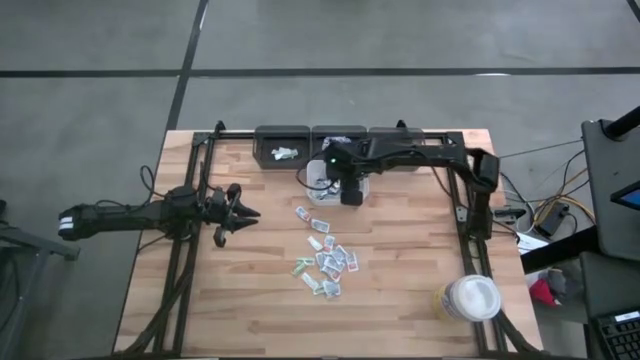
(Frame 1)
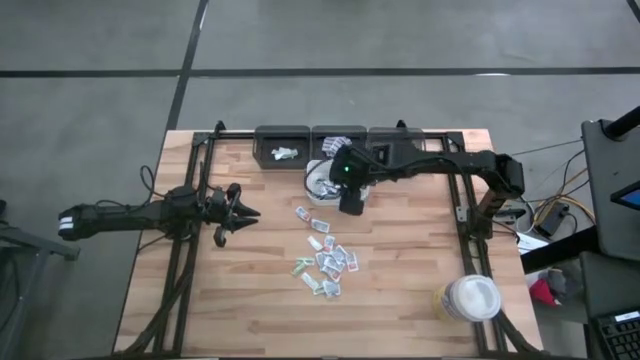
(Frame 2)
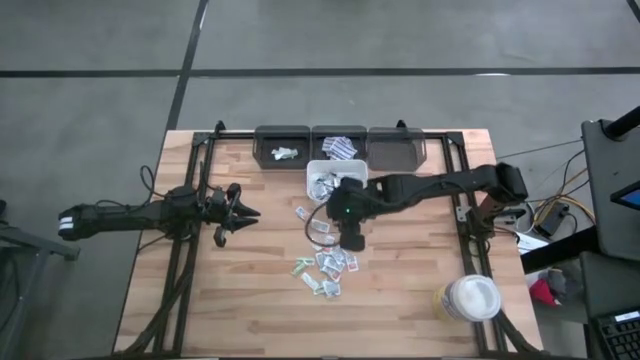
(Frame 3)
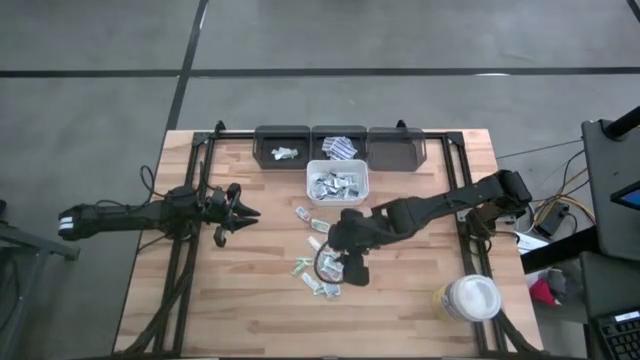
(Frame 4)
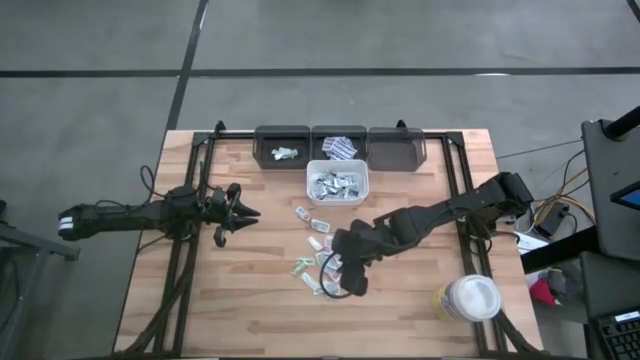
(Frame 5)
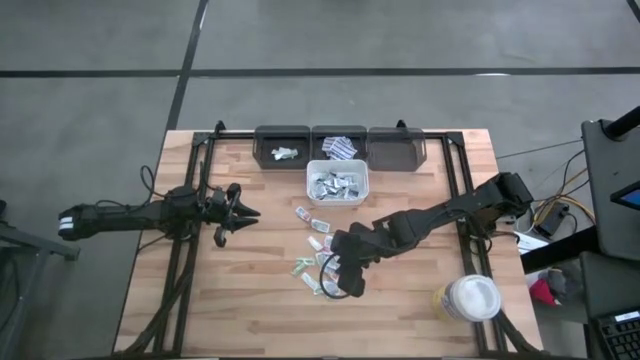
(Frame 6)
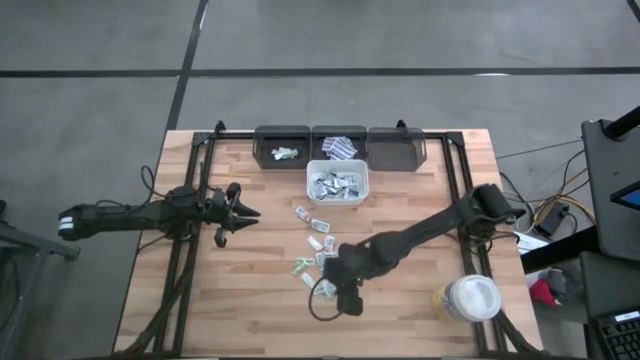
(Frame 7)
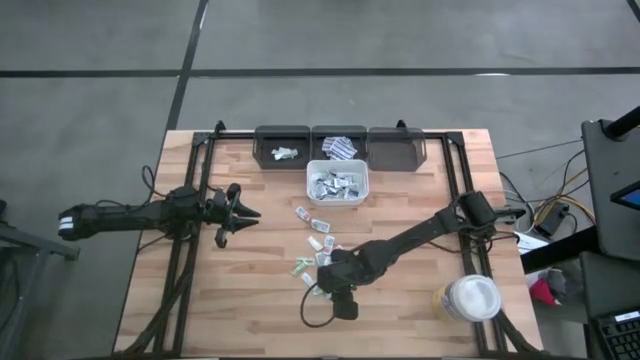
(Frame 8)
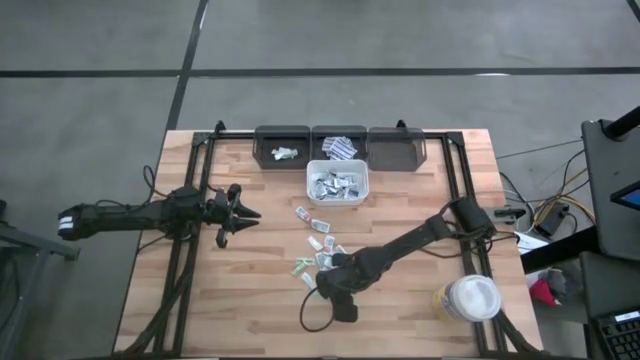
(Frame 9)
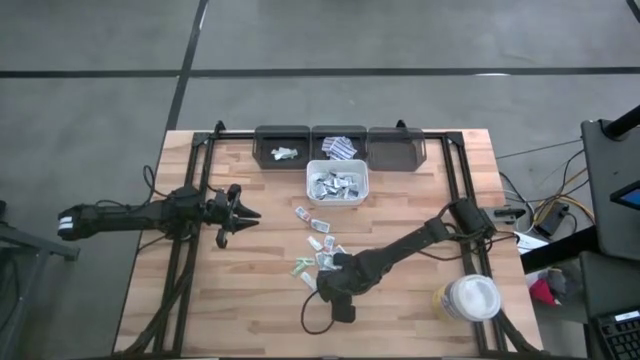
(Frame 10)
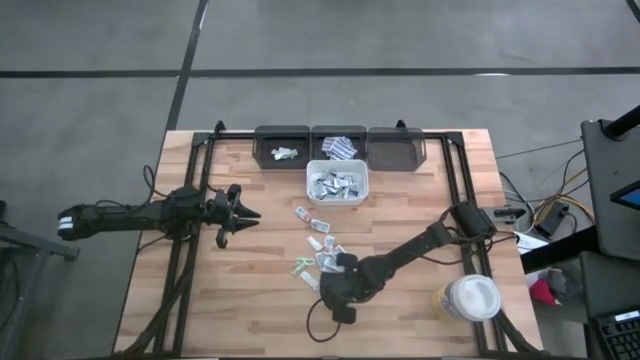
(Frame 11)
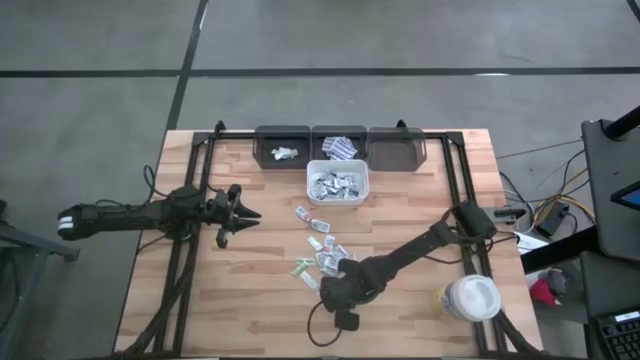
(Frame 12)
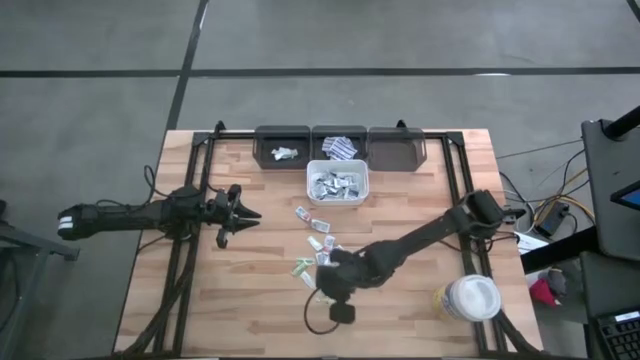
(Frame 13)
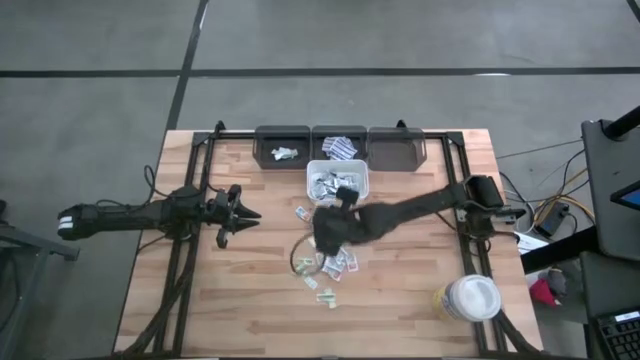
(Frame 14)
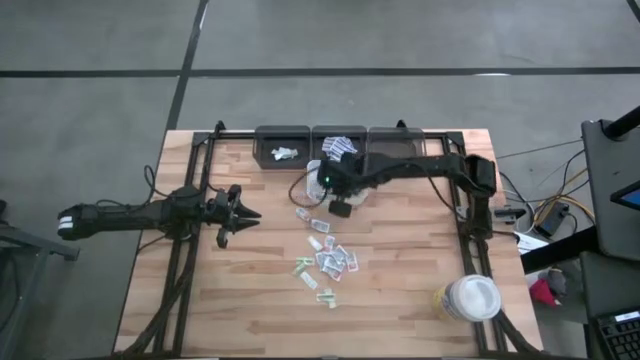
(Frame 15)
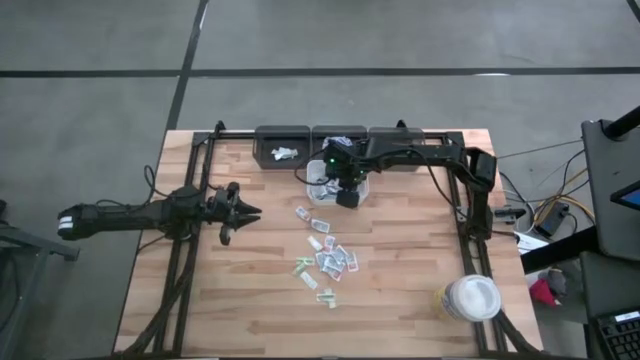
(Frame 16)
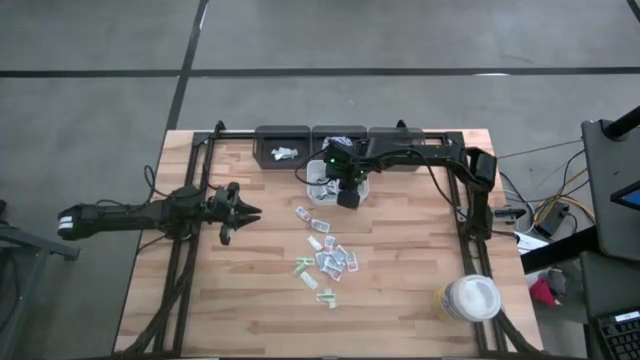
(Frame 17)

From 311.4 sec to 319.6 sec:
Task: Pick & Place First Aid Supplies
Put the blue alcohol pad into the white bin

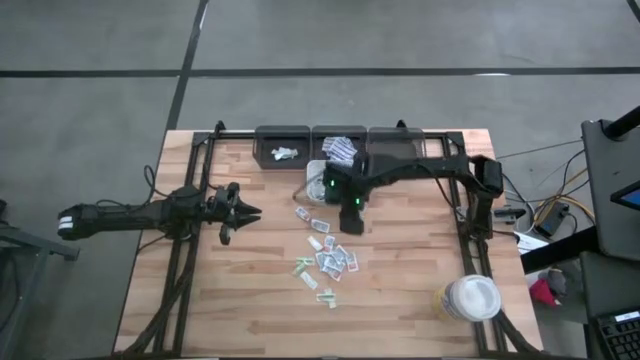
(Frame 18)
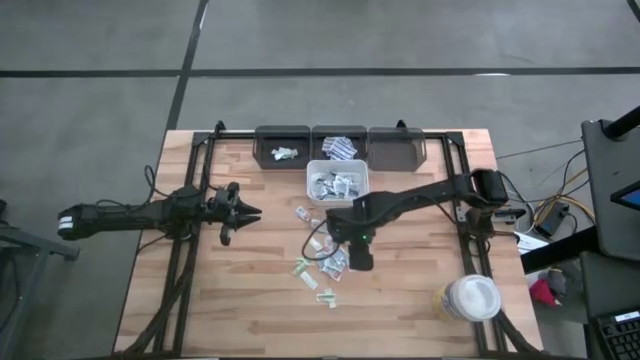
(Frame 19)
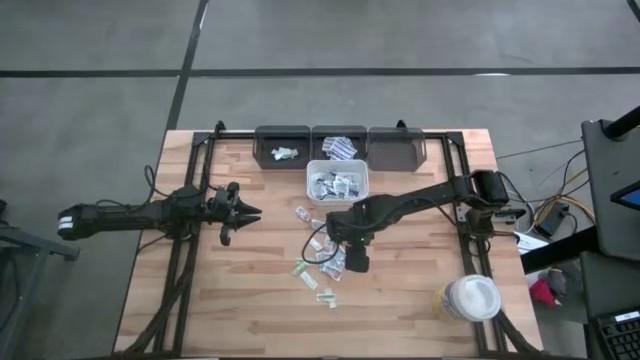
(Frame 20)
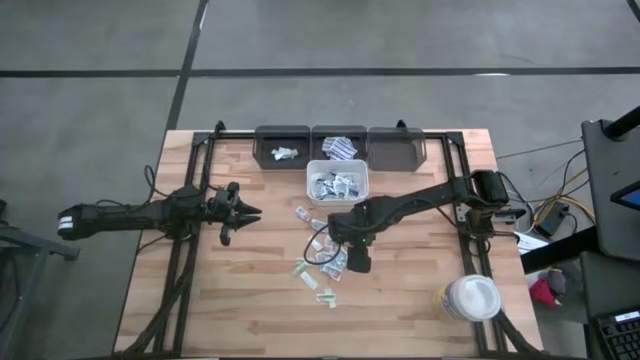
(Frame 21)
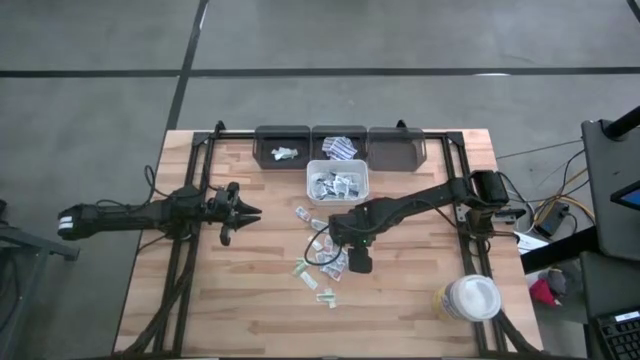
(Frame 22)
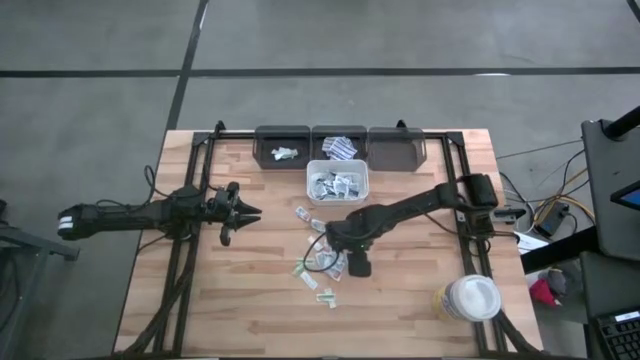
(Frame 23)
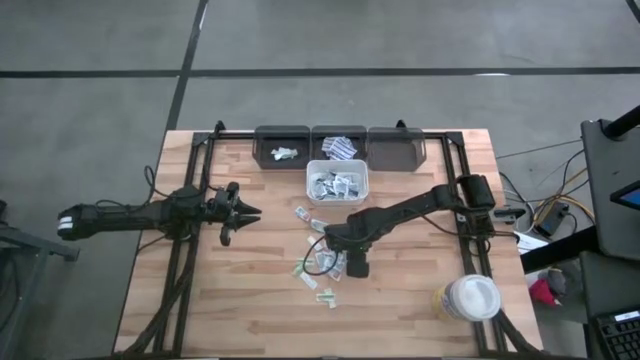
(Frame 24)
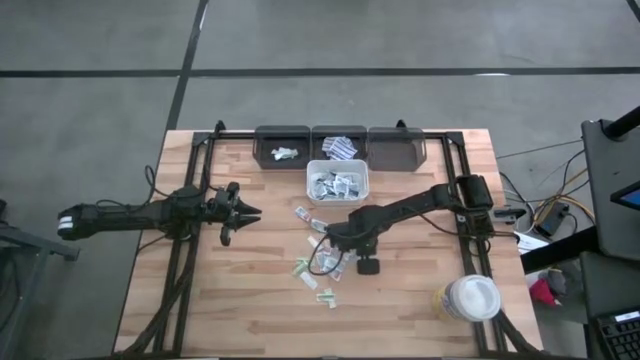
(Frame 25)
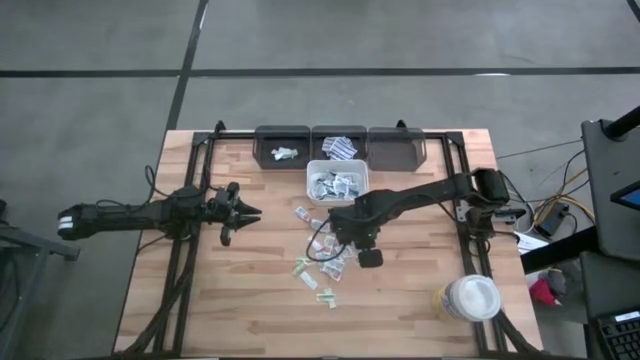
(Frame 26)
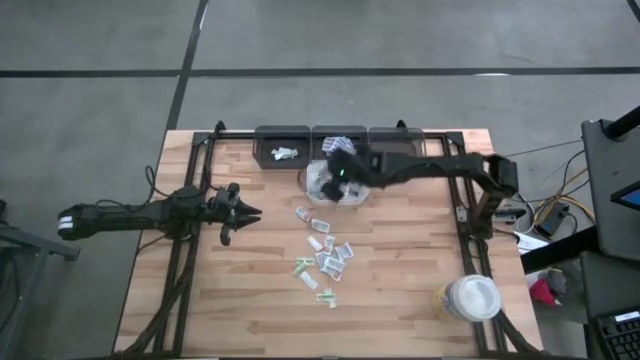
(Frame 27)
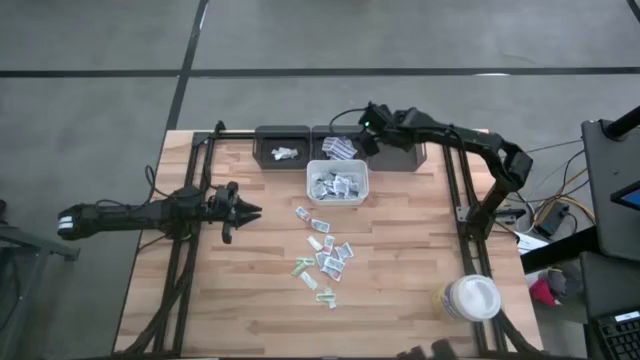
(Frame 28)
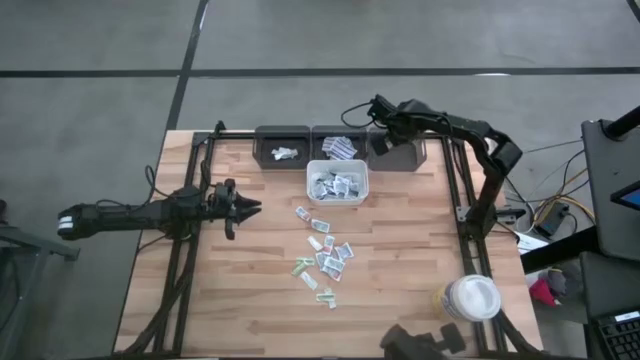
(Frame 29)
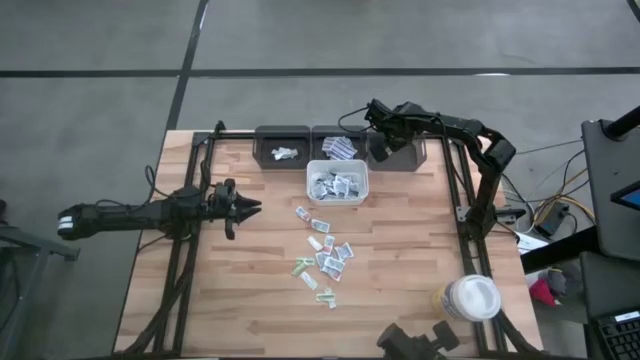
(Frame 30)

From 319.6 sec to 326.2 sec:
Put the orange ointment pack into the right black bin

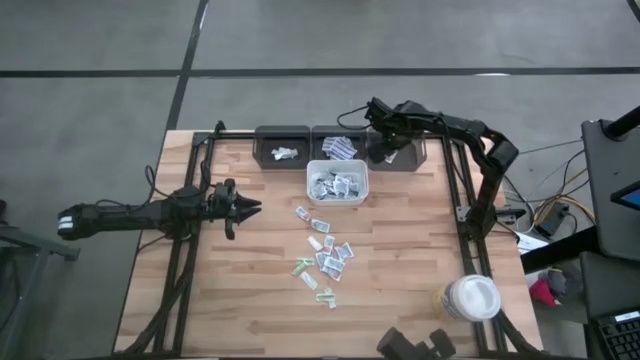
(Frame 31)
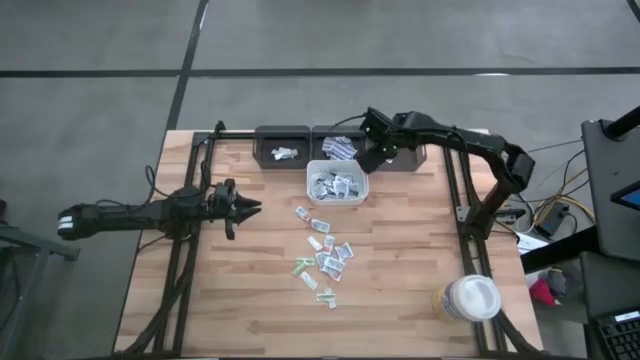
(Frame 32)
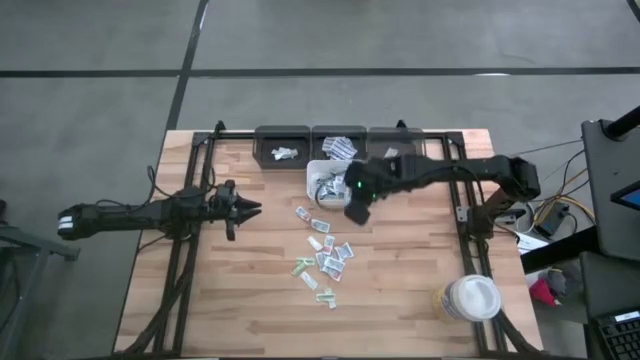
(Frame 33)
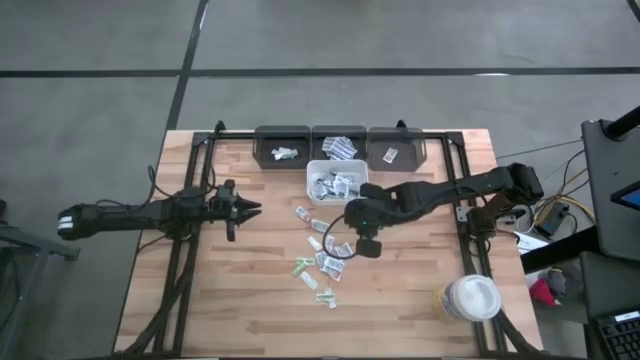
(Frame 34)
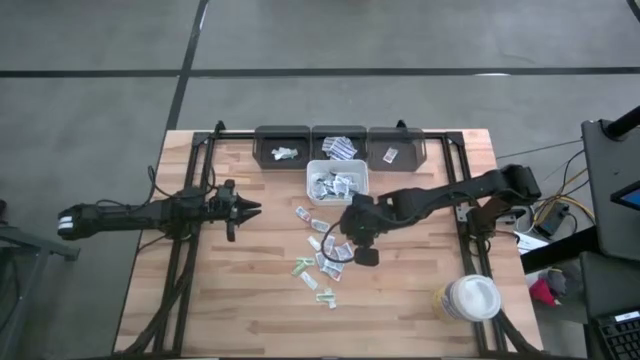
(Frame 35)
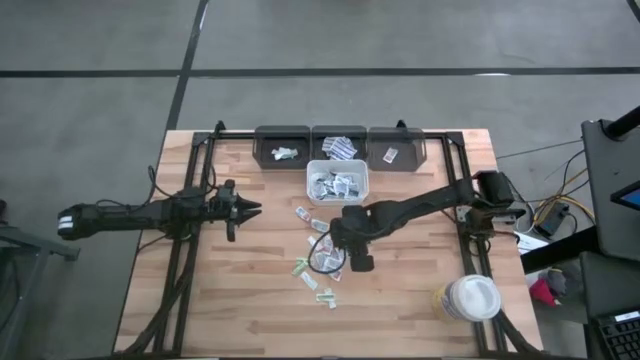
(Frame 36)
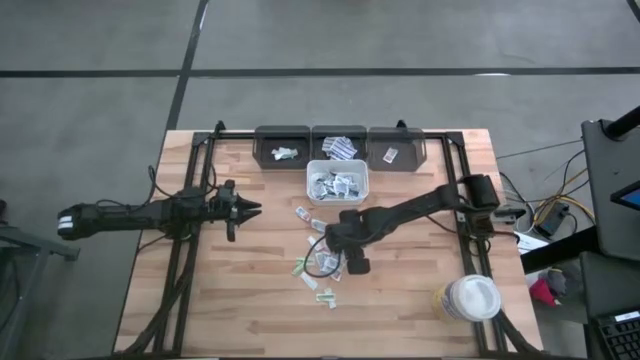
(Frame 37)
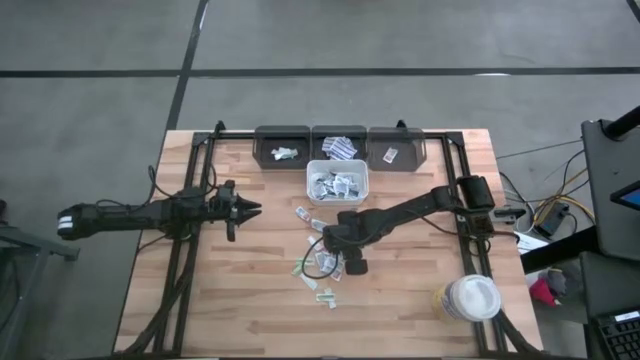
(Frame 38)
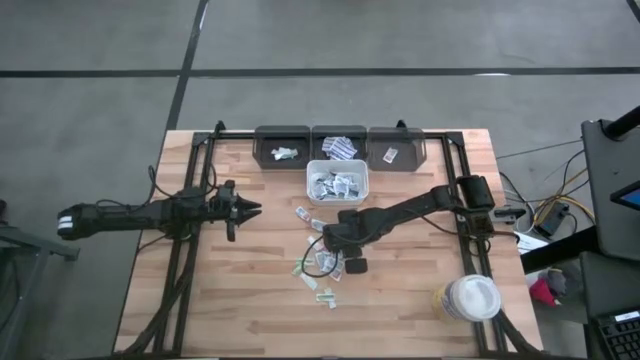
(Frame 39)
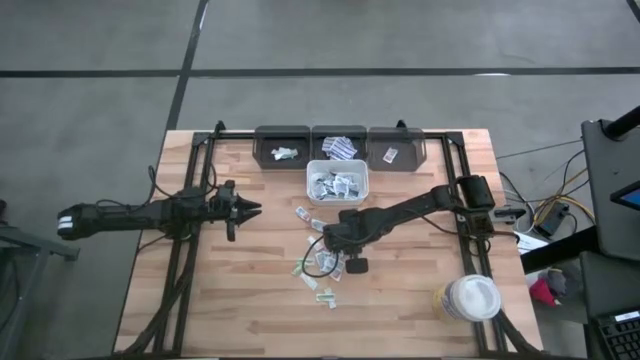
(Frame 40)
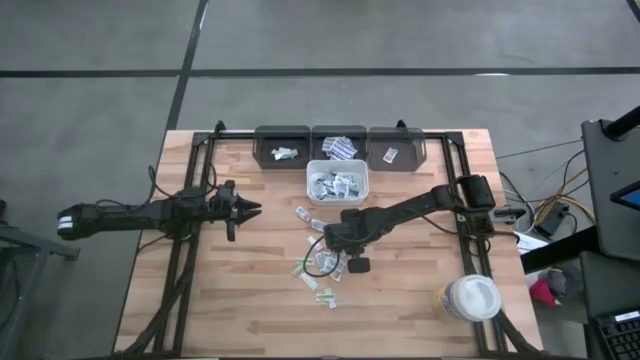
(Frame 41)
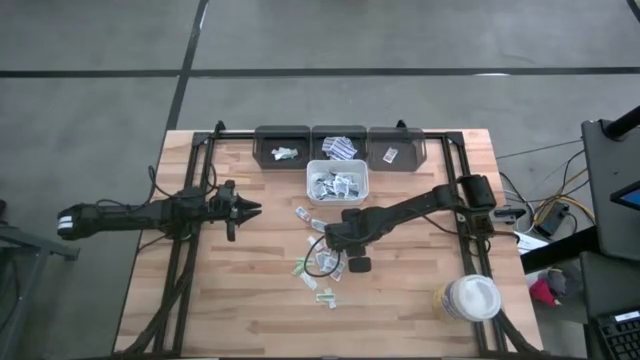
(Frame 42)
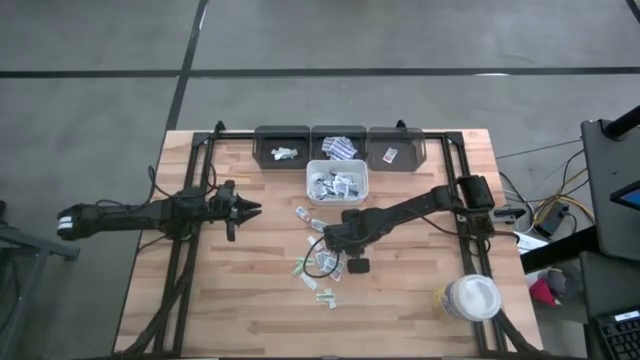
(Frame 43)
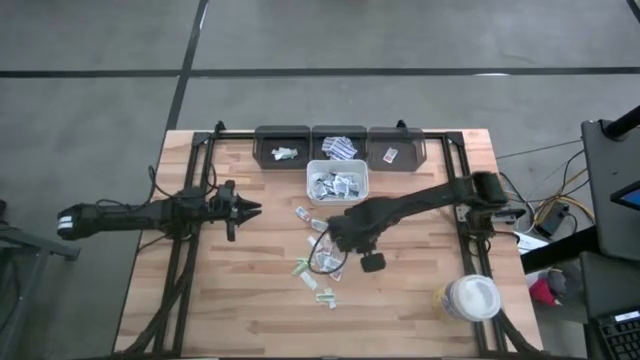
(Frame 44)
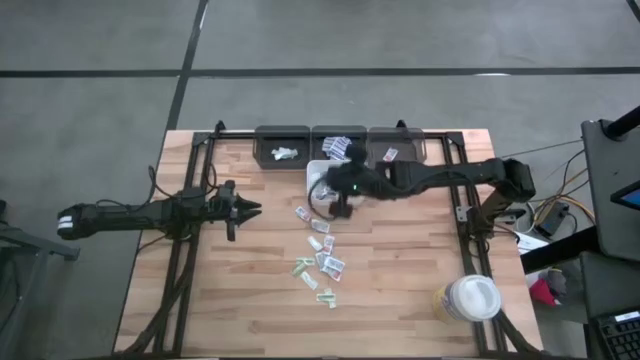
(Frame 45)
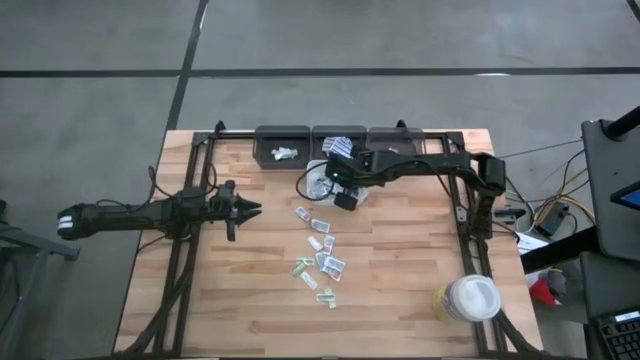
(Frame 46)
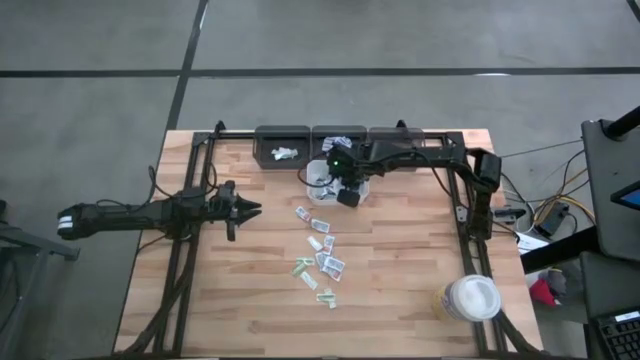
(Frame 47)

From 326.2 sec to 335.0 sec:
Put the blue alcohol pad into the white bin
